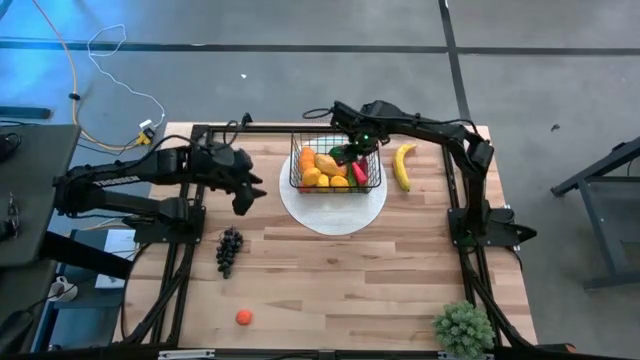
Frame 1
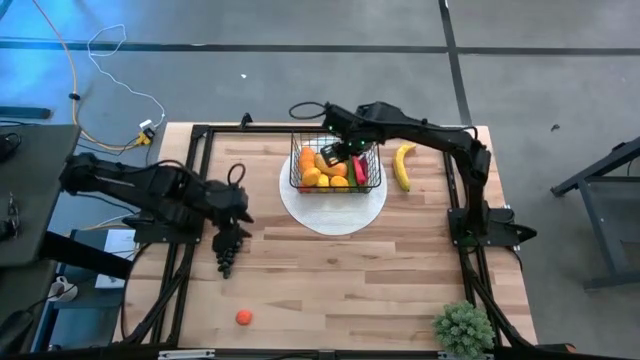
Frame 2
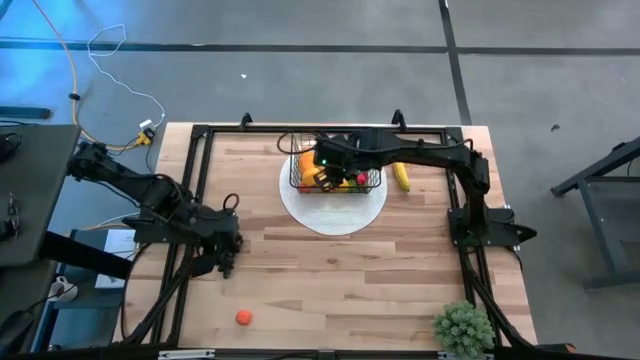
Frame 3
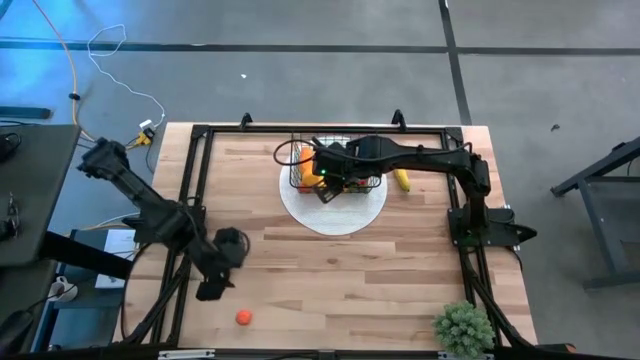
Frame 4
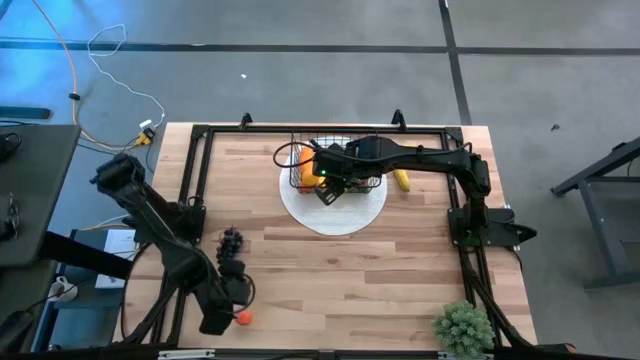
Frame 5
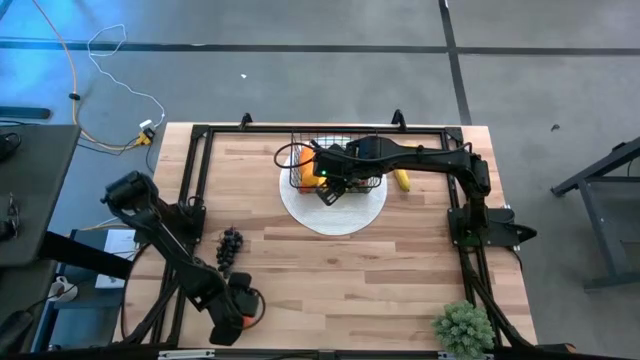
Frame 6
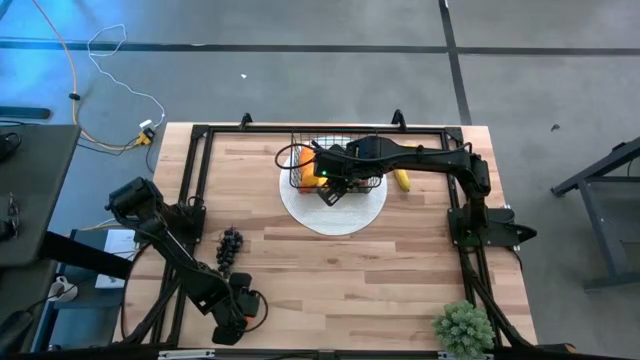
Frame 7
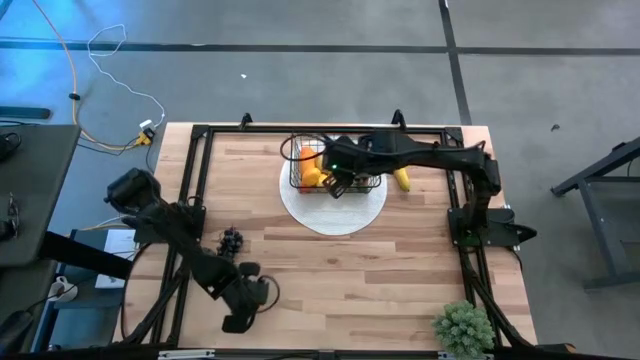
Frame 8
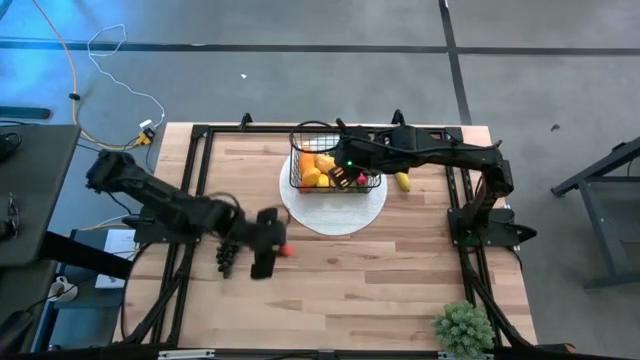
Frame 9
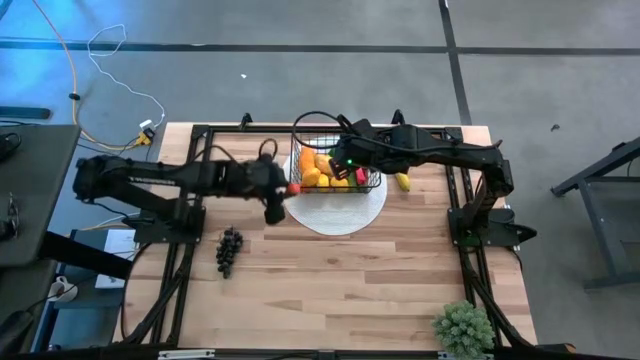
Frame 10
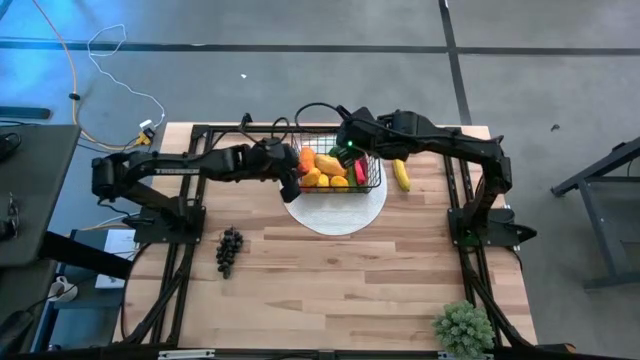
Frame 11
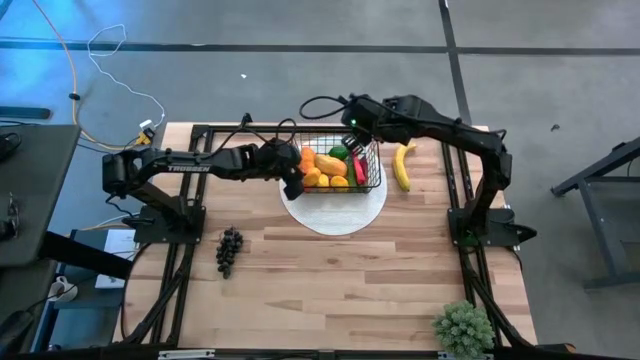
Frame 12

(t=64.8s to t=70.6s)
Task: Build produce basket
Put the orange into the black wire basket

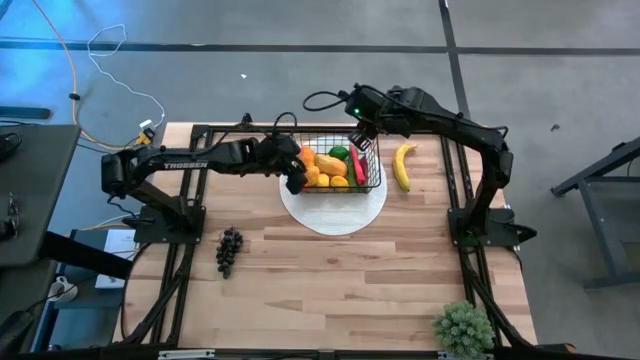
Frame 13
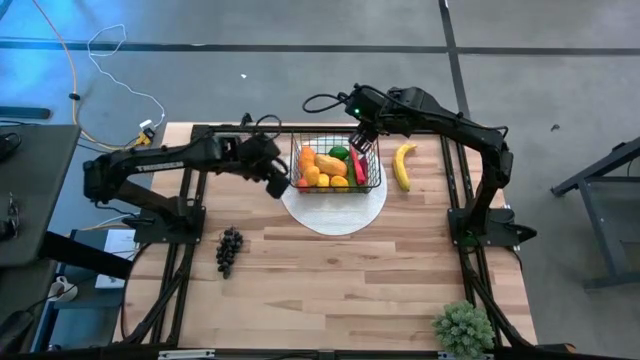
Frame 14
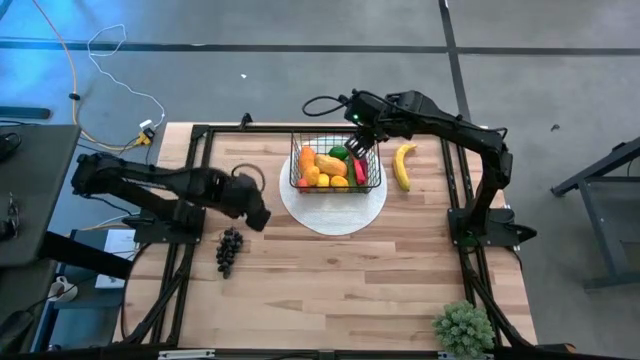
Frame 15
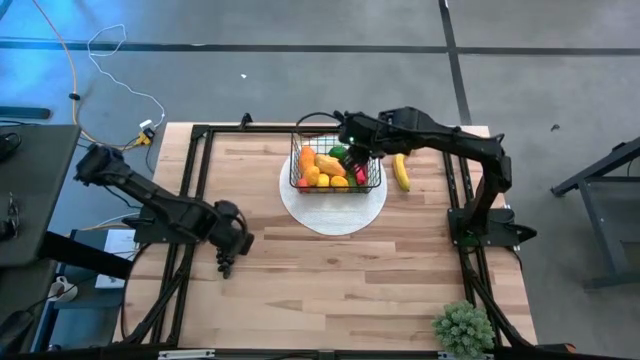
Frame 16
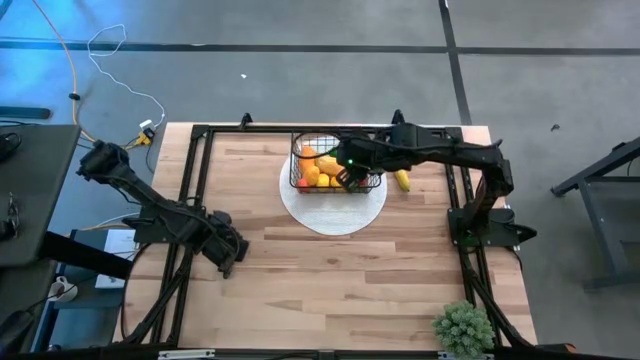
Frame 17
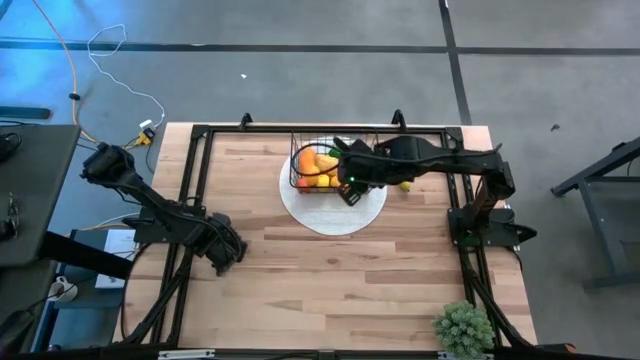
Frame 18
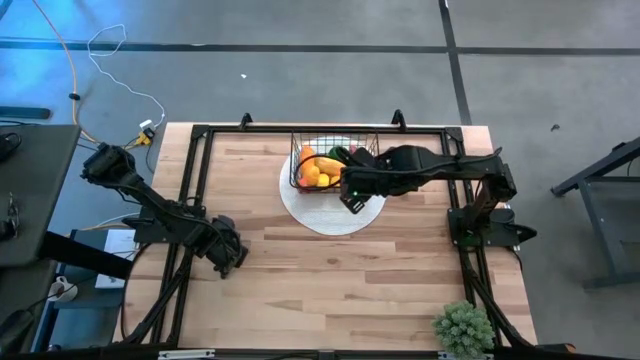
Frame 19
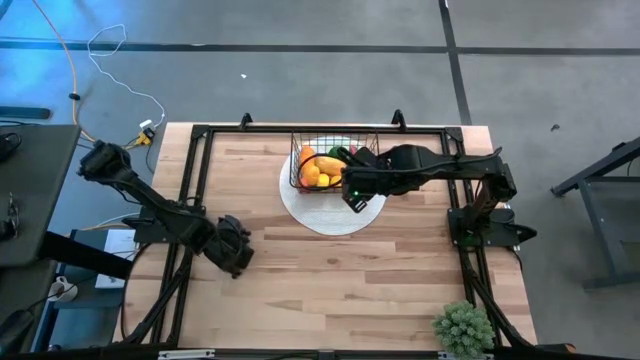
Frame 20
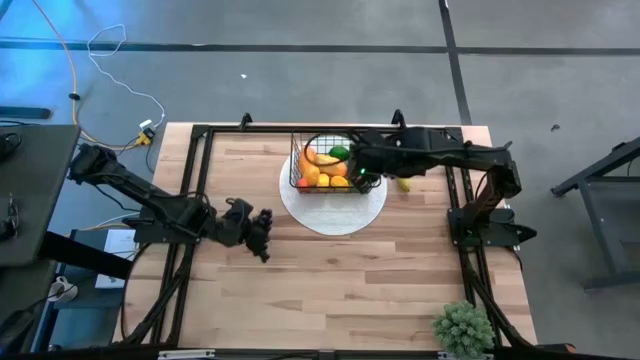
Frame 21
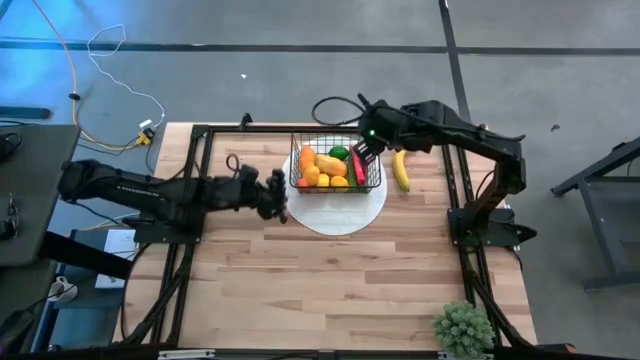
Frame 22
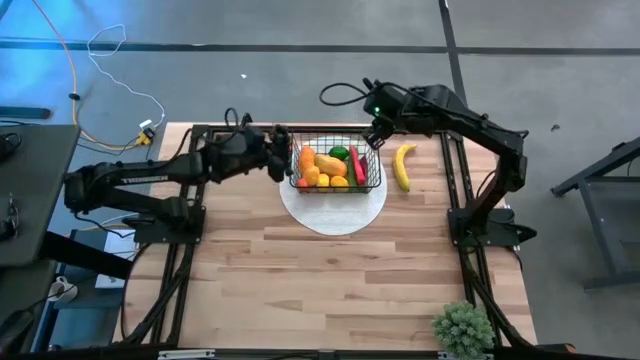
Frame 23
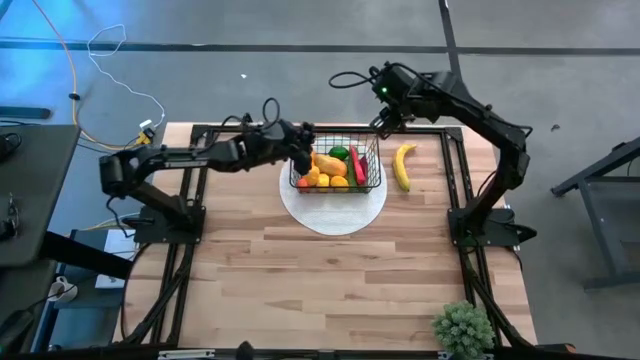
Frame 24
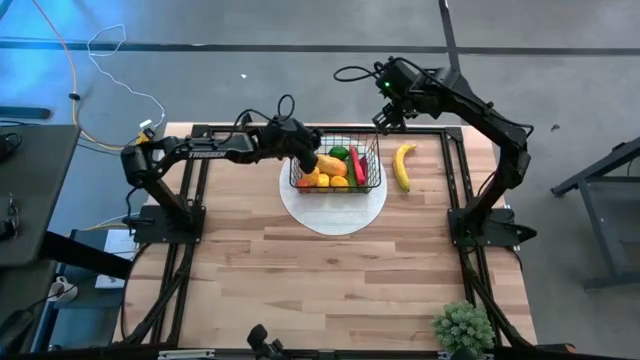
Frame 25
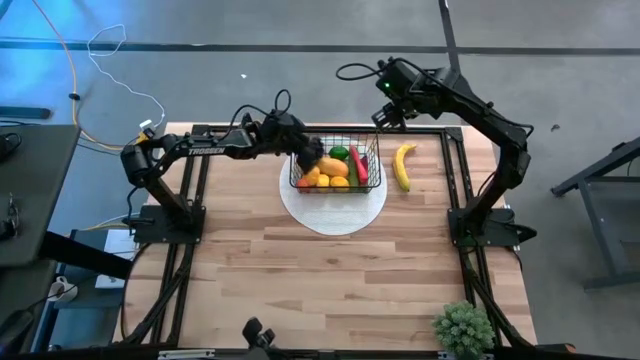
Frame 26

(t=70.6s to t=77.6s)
Put the violet grapes into the black wire basket

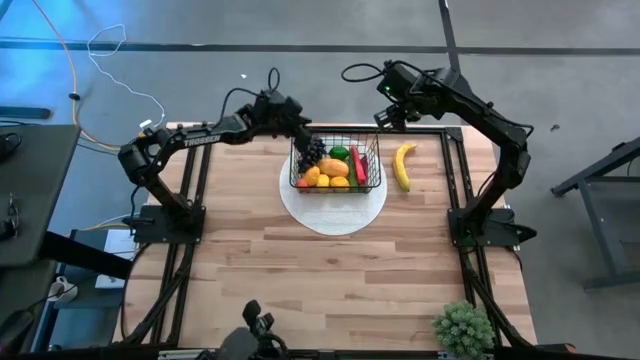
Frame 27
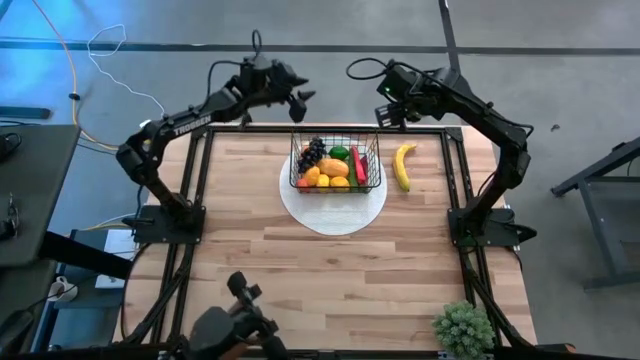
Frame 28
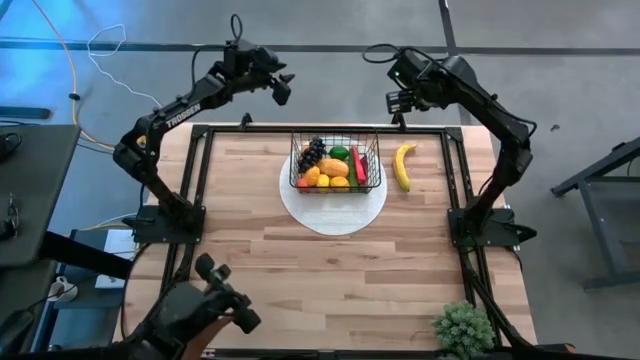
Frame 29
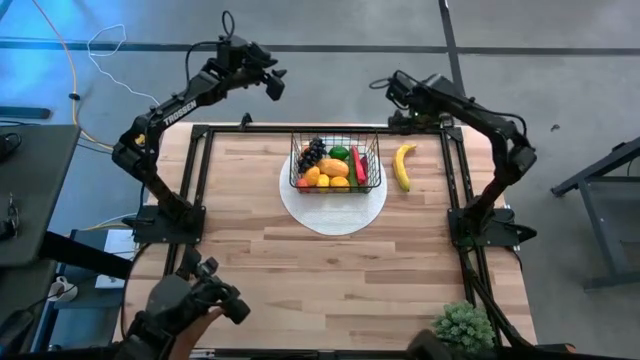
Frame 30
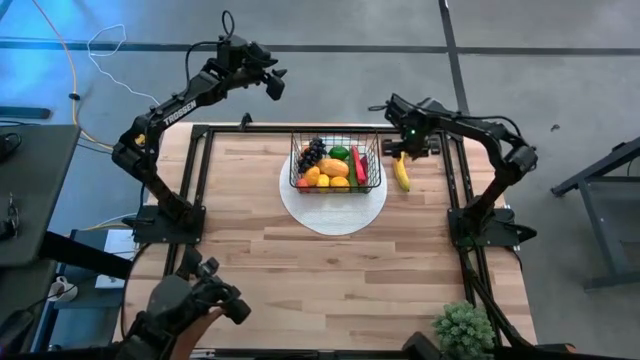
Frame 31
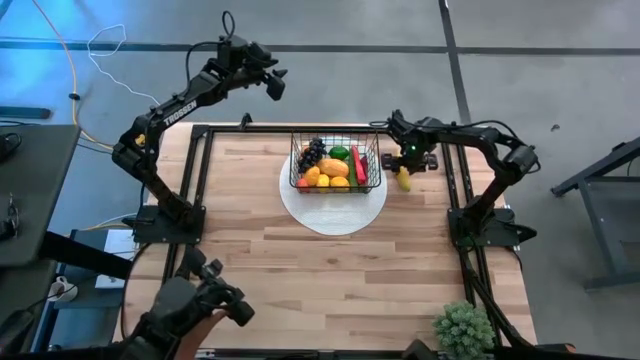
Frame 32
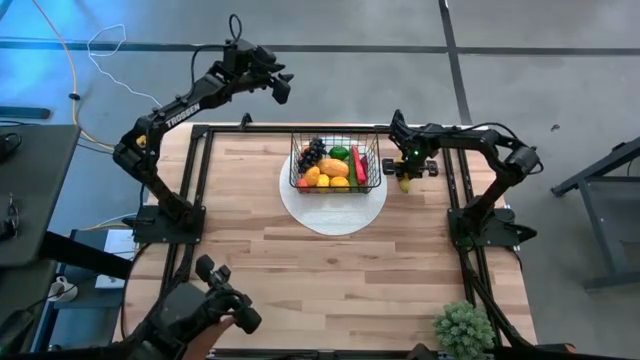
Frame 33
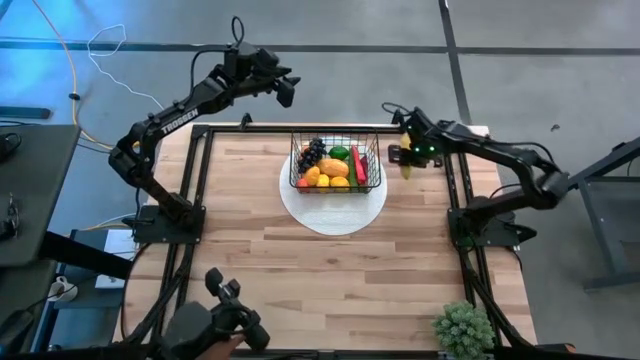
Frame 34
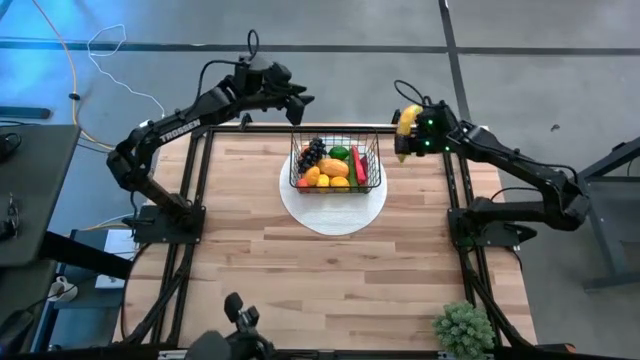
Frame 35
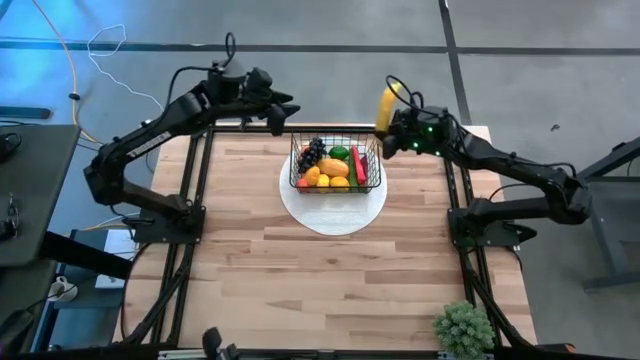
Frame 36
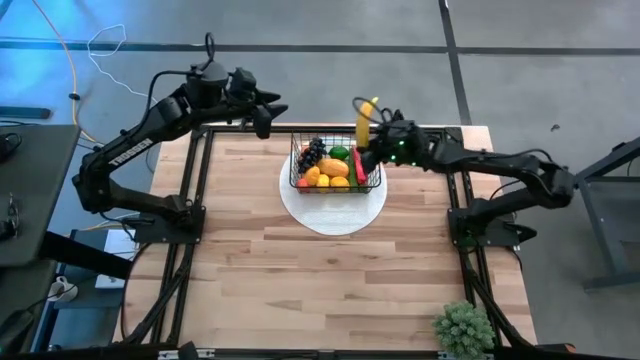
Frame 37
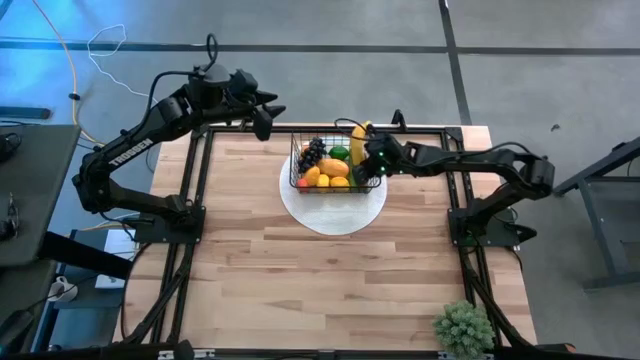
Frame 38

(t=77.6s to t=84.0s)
Put the yellow banana into the black wire basket
